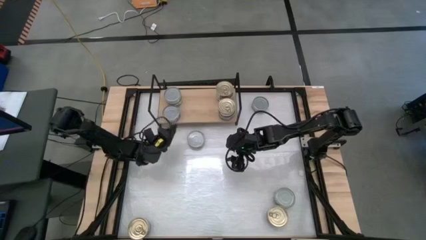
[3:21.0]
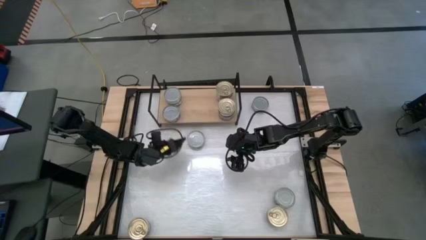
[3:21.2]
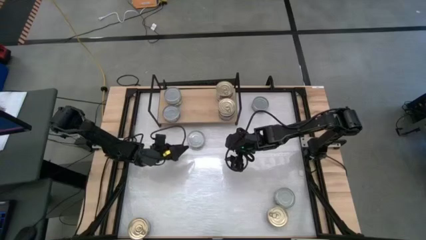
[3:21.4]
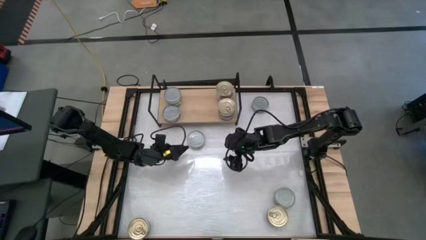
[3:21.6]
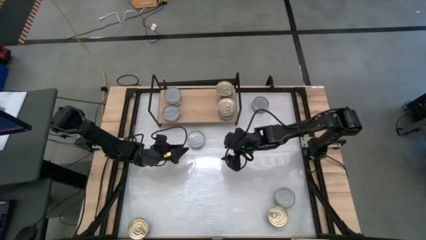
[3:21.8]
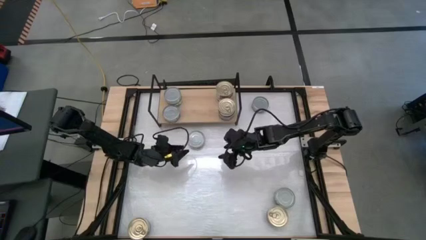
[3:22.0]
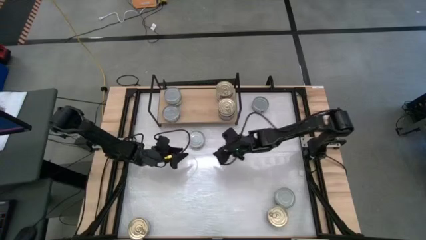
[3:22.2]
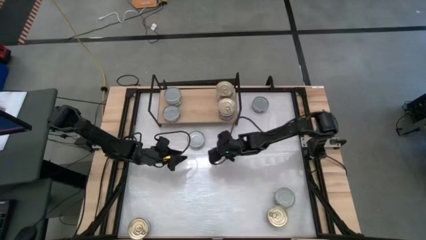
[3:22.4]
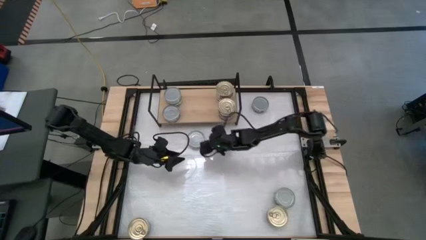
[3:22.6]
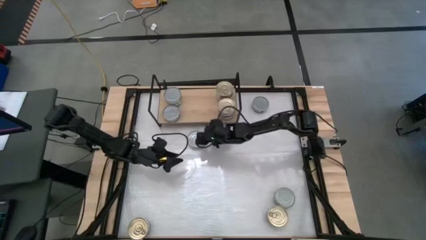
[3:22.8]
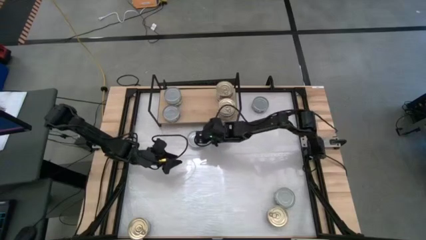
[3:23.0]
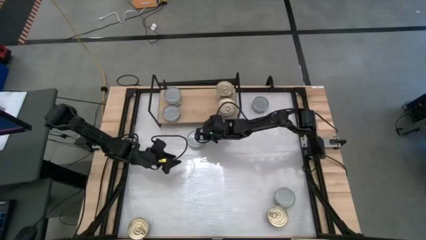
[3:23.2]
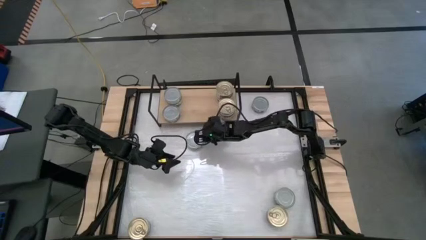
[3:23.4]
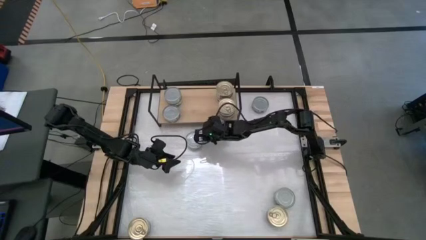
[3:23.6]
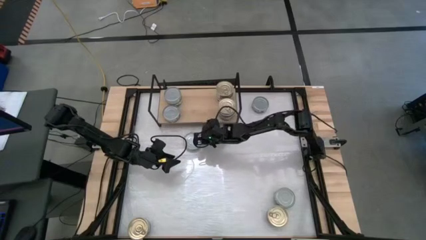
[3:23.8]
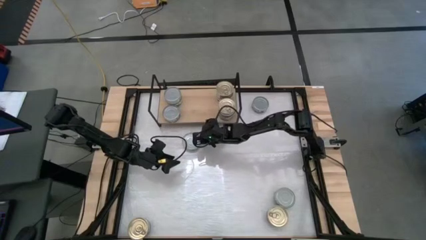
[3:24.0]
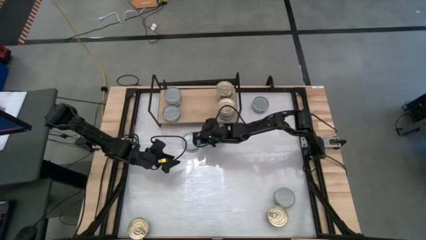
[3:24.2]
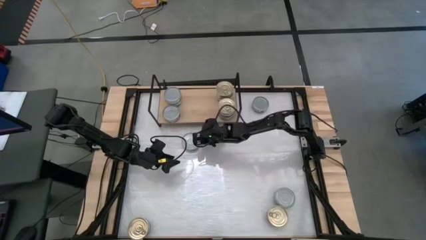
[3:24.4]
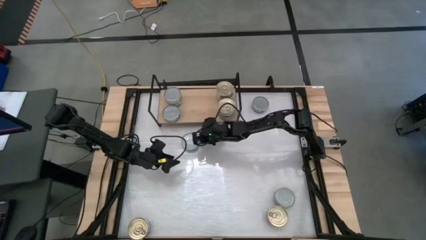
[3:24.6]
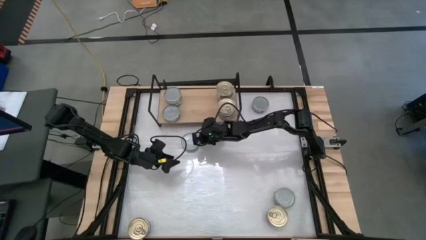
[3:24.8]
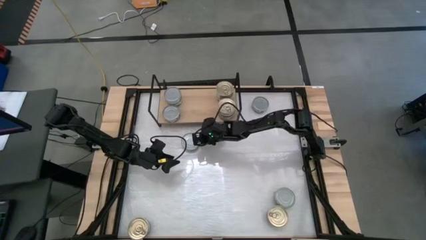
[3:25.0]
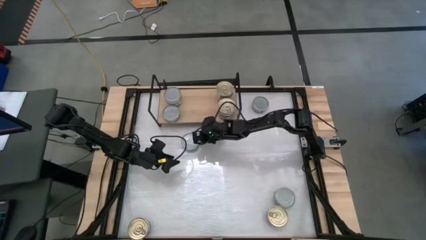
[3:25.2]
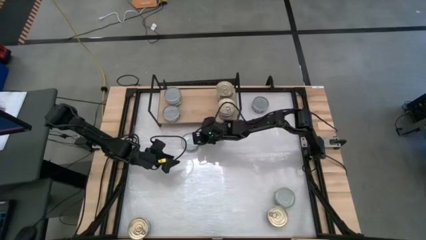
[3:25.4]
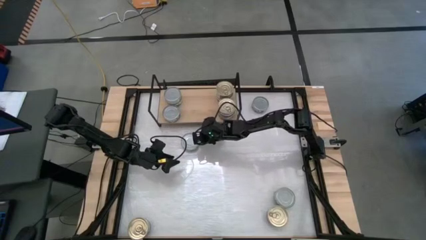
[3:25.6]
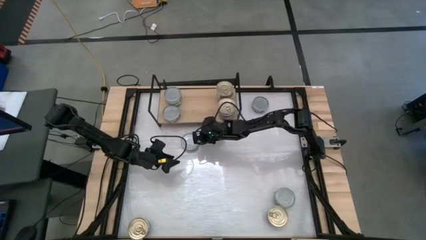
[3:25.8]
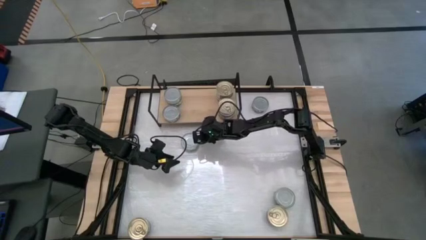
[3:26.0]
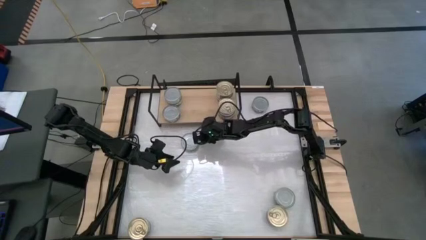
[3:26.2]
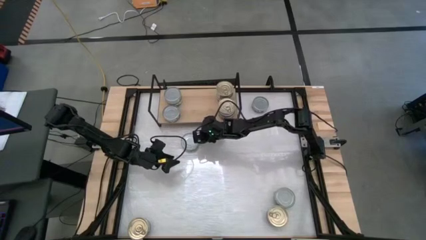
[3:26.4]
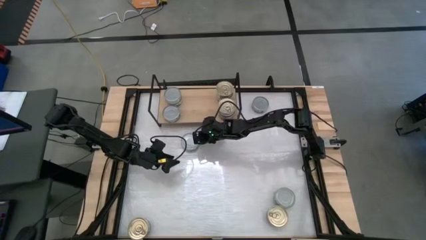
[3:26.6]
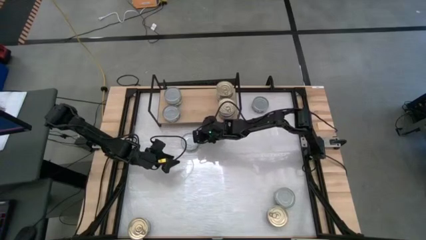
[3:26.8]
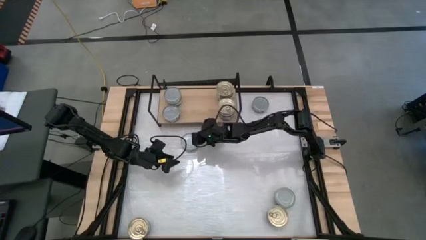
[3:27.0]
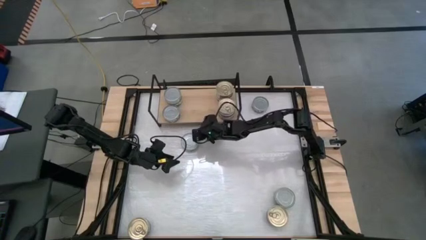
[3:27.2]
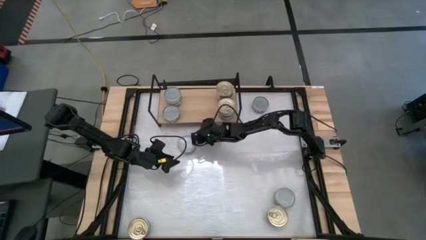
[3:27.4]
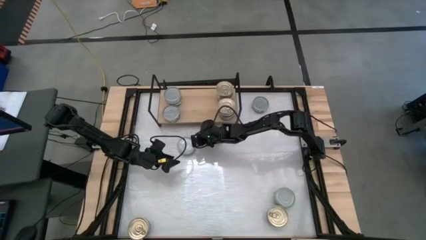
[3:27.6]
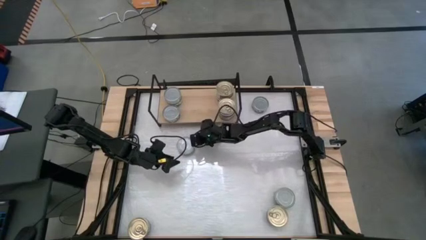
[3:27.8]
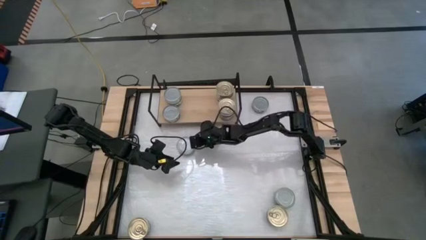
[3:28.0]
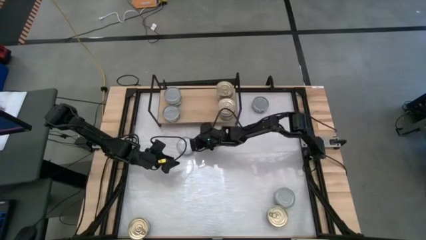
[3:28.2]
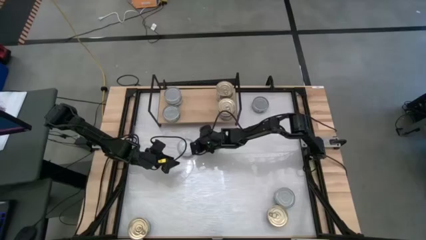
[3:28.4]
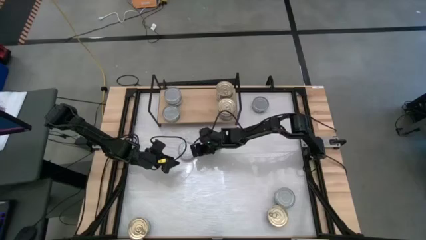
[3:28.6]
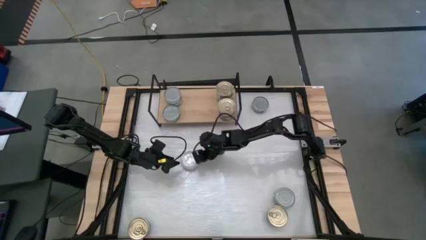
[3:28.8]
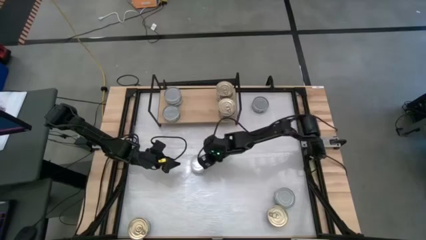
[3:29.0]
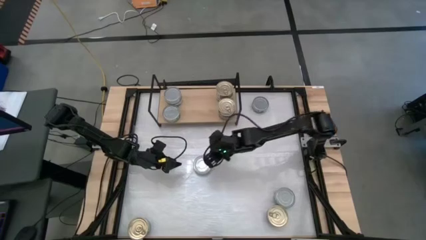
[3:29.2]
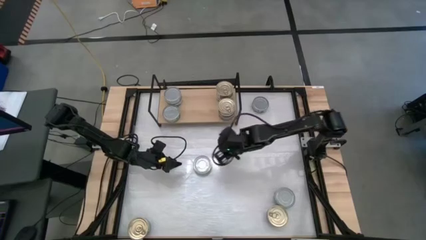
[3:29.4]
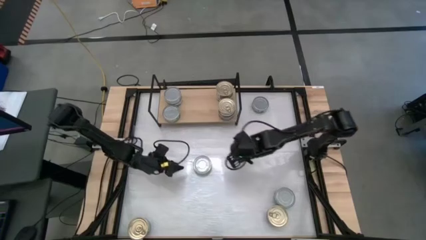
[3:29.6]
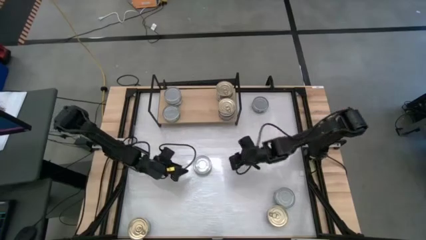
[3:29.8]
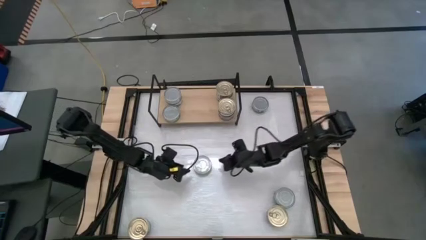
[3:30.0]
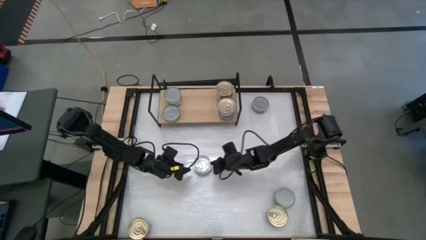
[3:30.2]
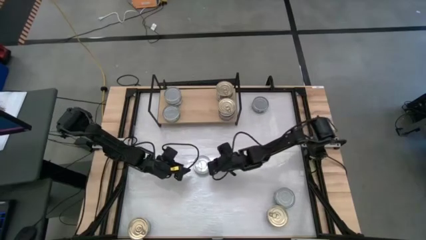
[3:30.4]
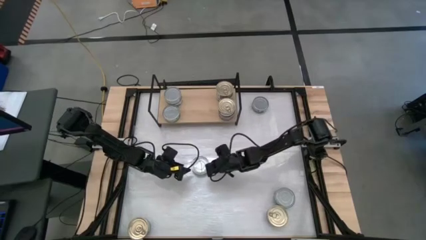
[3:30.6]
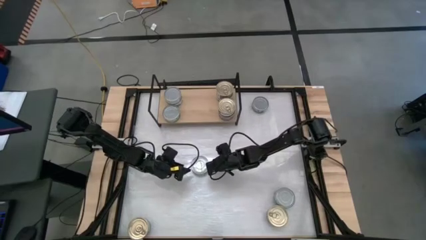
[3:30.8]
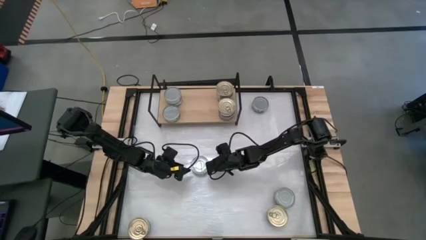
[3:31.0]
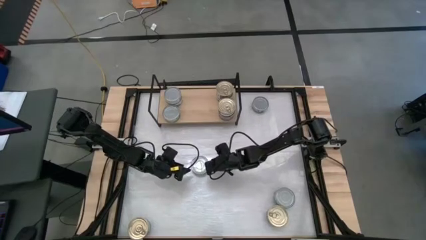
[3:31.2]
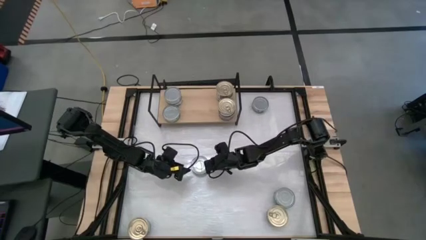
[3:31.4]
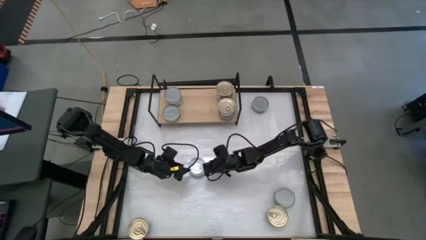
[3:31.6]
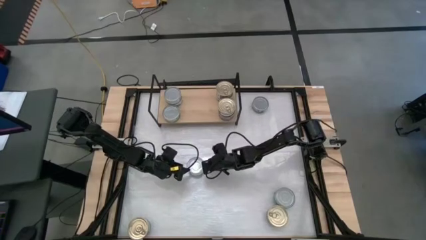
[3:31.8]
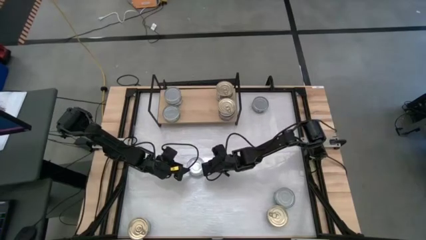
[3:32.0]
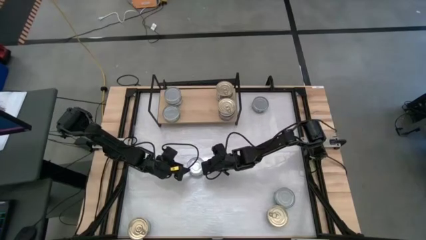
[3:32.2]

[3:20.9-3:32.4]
Task: Stack canned seafood by type on shelf
Stack the green tuna can on top of the green tuna can on the shelf

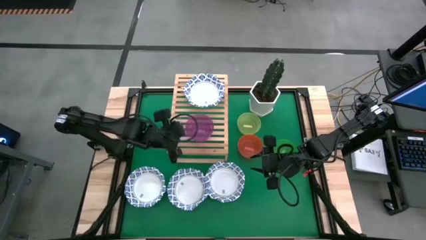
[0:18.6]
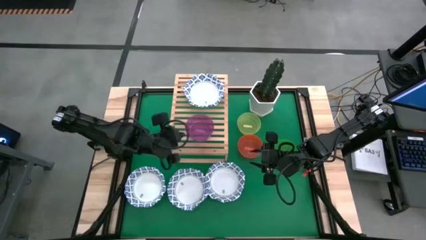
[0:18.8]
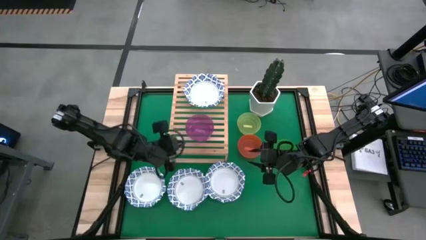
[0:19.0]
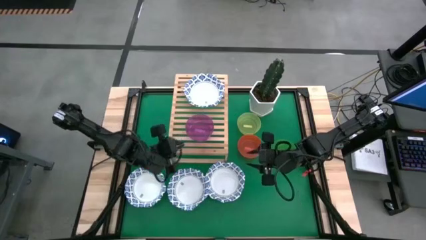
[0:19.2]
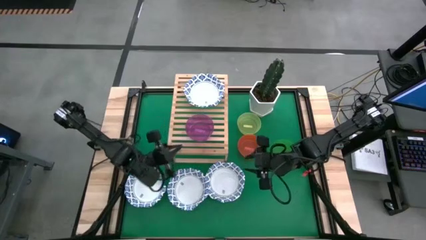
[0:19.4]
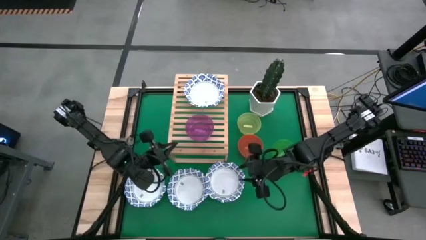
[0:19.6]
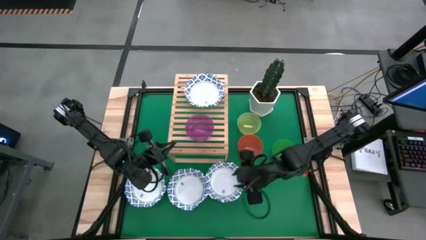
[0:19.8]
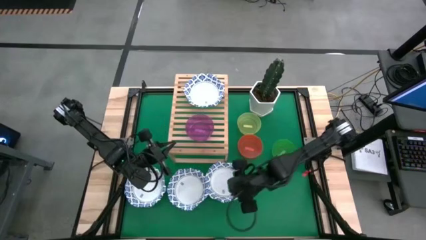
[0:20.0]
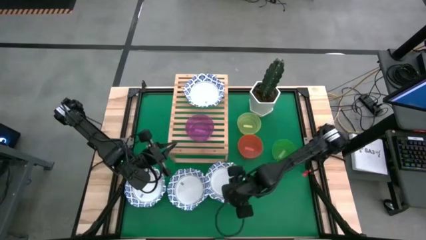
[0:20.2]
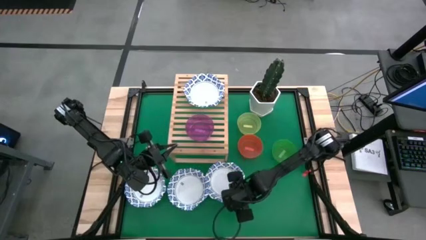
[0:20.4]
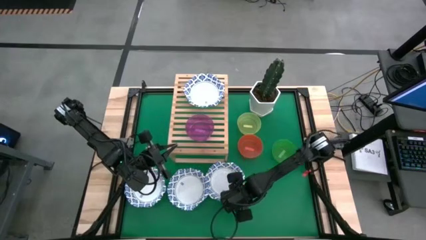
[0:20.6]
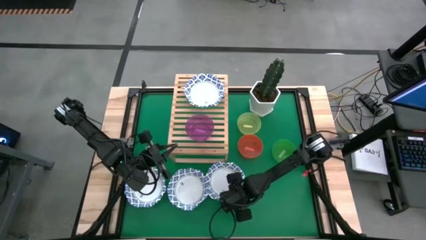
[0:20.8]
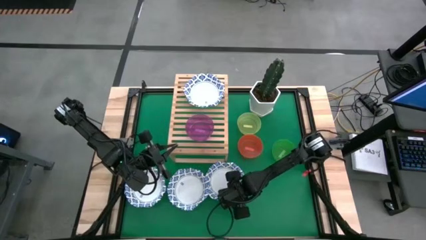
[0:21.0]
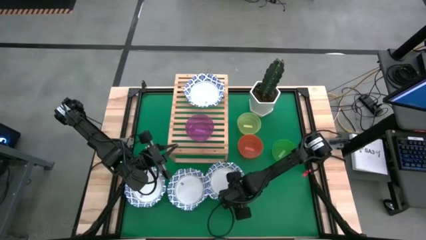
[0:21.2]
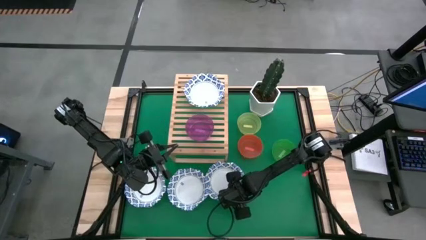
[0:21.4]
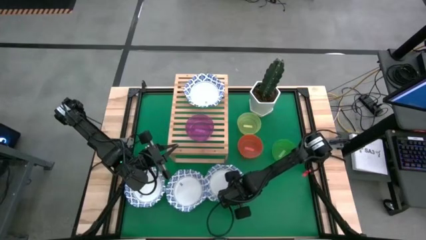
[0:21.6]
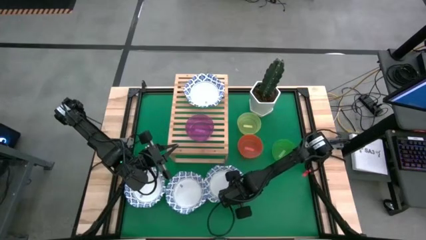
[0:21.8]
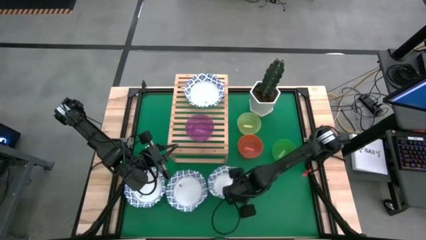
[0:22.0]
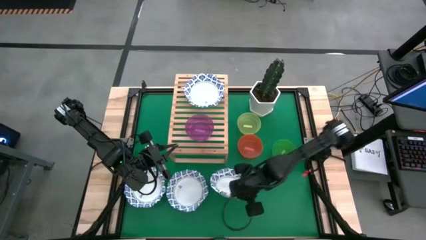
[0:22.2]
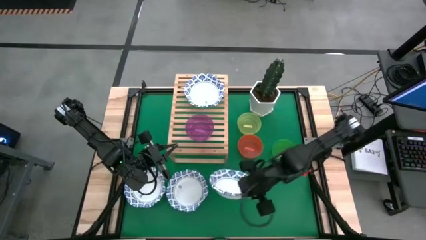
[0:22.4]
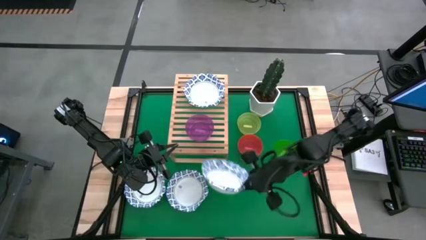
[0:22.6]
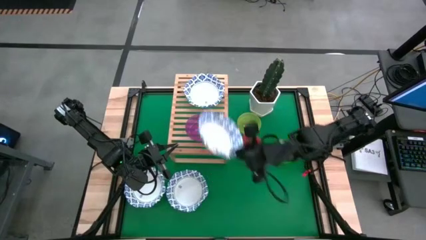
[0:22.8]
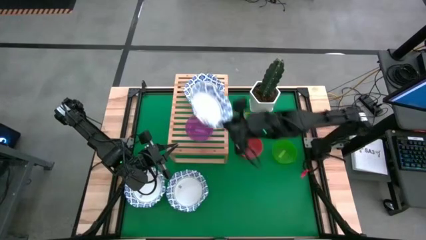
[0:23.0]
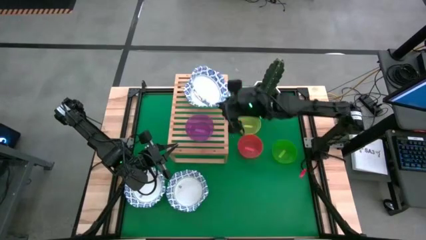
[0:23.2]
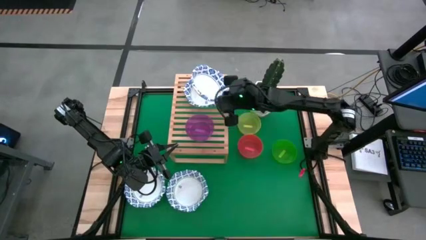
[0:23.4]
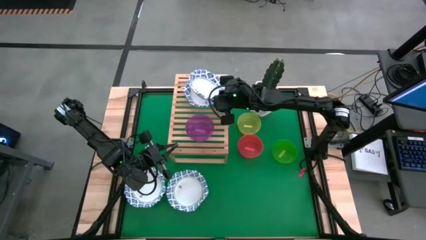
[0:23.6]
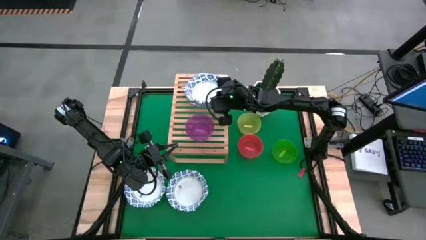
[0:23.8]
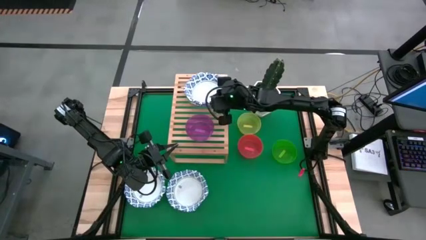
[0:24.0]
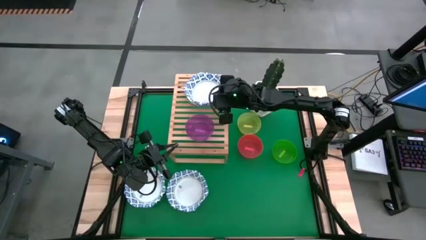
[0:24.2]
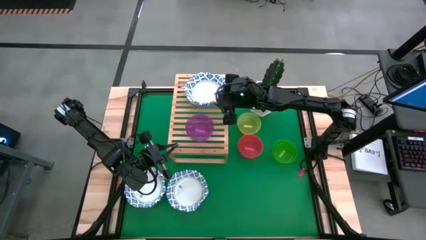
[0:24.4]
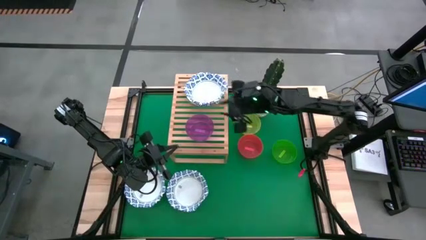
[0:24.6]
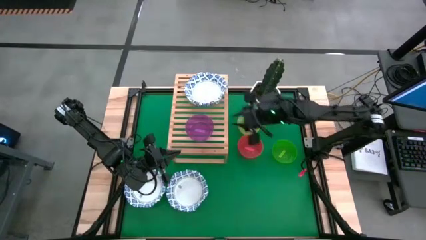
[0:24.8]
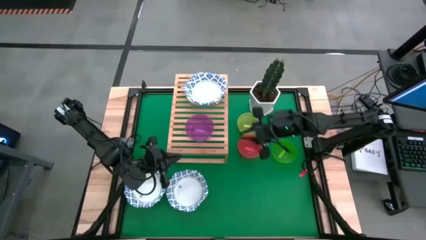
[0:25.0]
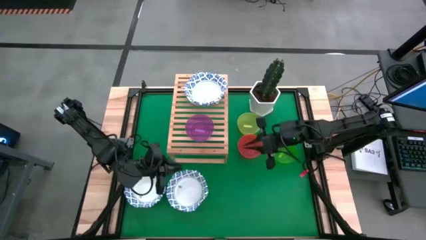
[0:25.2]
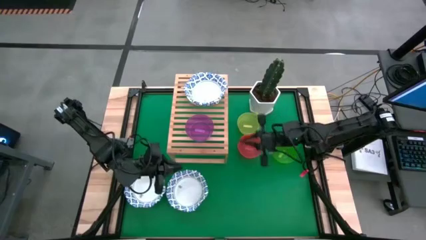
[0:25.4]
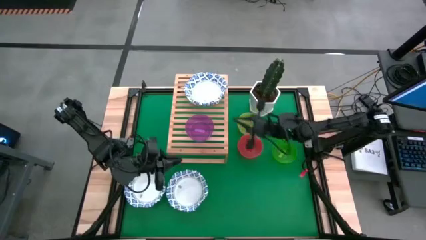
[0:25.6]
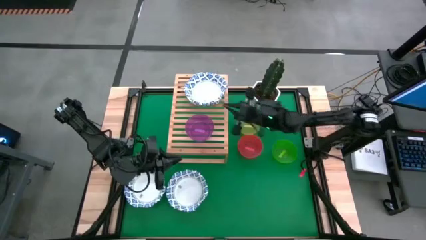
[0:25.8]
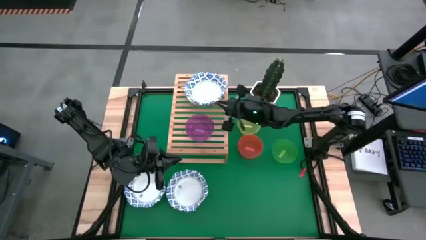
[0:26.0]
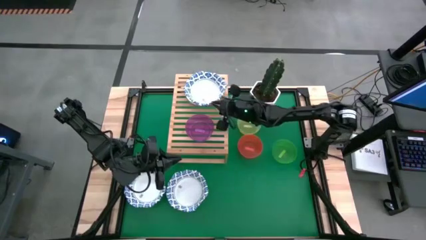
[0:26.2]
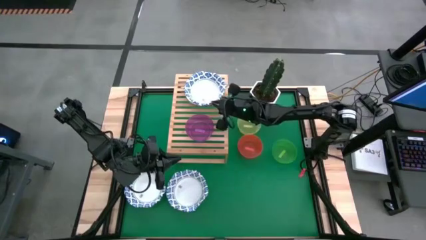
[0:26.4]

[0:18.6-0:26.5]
Task: Place and stack bowls onto a shelf
Stack the white and blue bowl on top with the other white and blue bowl on the shelf
